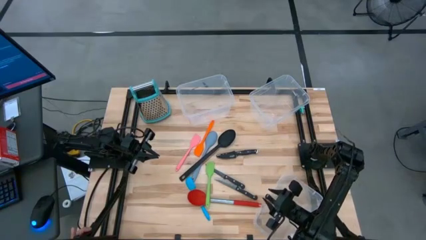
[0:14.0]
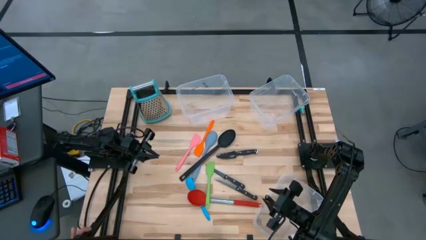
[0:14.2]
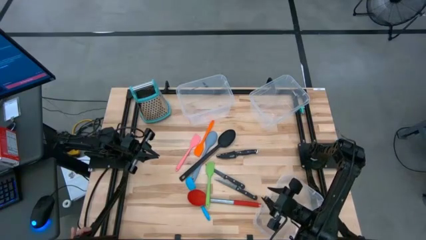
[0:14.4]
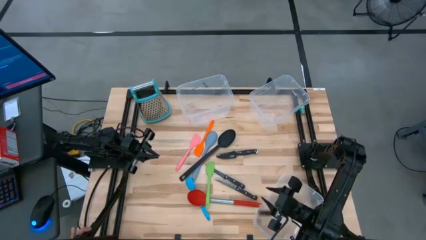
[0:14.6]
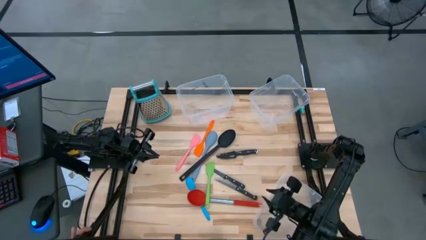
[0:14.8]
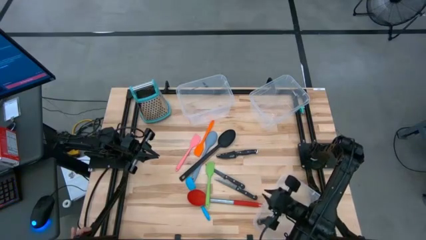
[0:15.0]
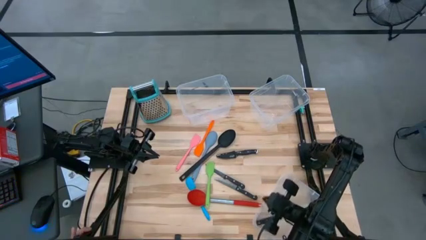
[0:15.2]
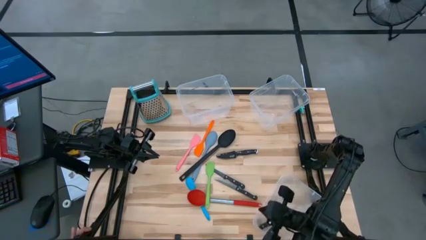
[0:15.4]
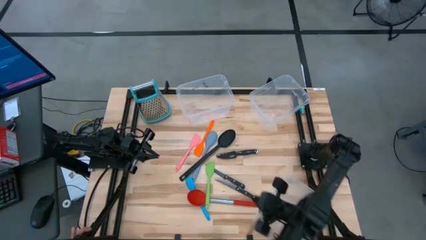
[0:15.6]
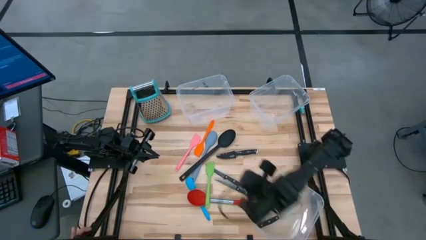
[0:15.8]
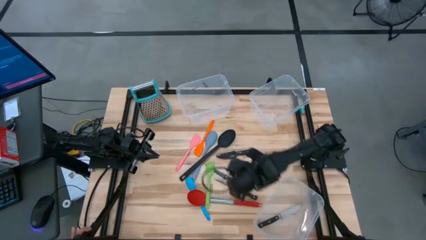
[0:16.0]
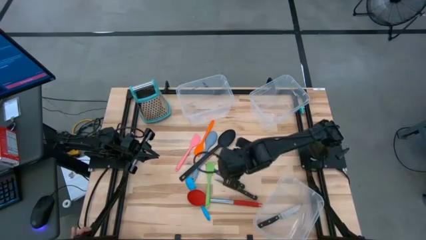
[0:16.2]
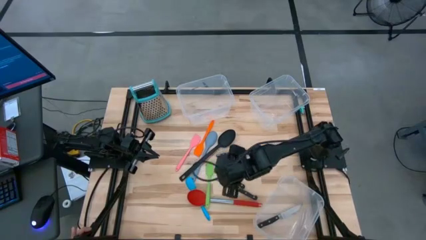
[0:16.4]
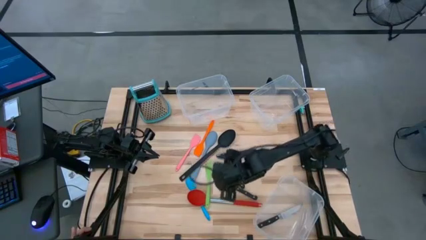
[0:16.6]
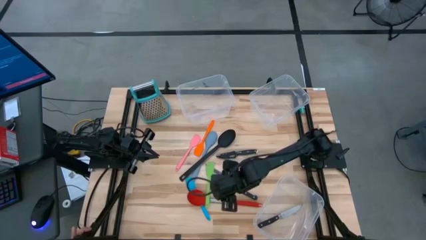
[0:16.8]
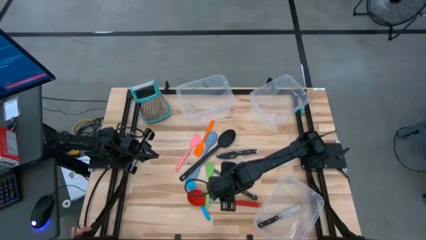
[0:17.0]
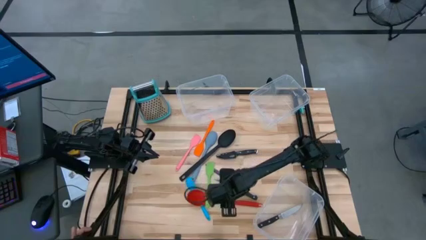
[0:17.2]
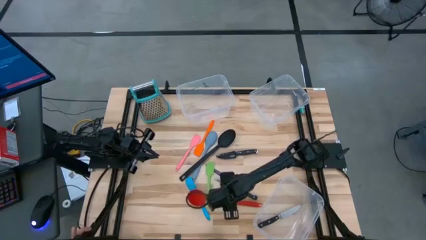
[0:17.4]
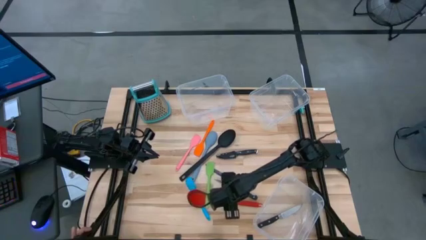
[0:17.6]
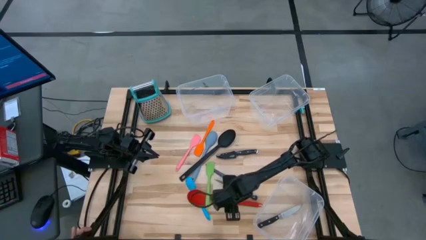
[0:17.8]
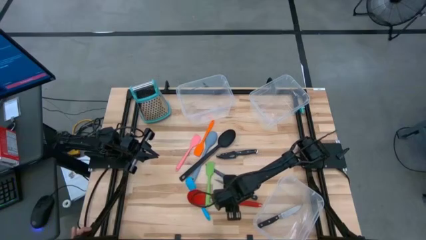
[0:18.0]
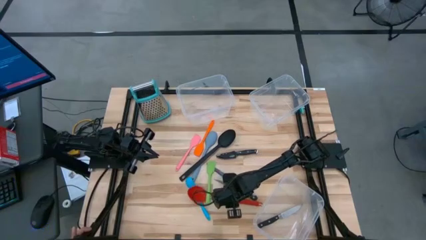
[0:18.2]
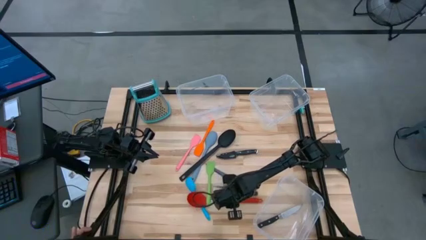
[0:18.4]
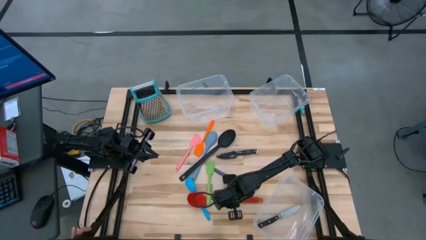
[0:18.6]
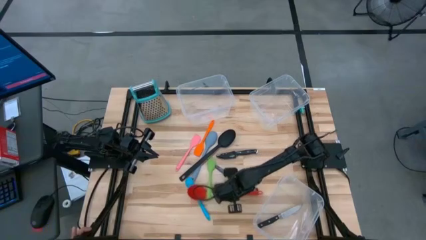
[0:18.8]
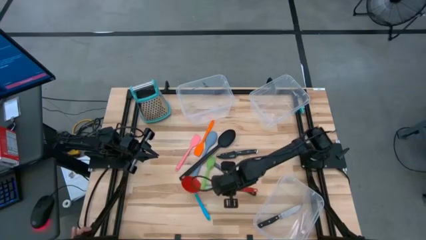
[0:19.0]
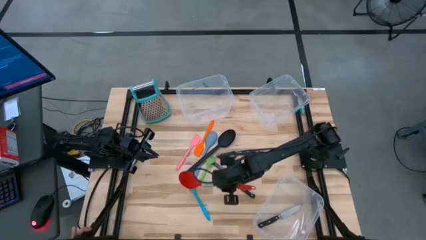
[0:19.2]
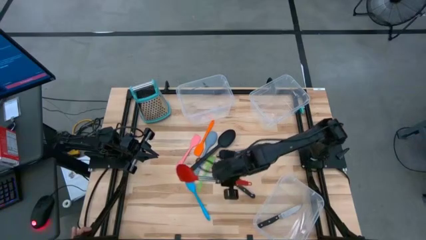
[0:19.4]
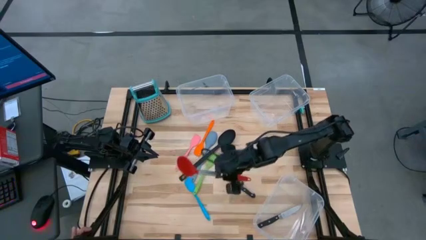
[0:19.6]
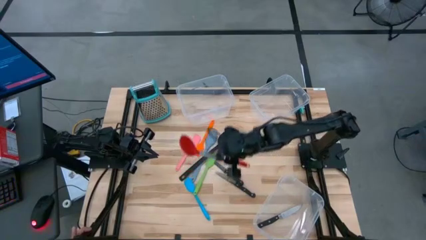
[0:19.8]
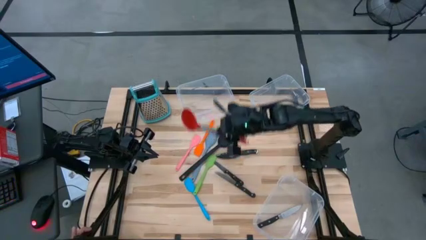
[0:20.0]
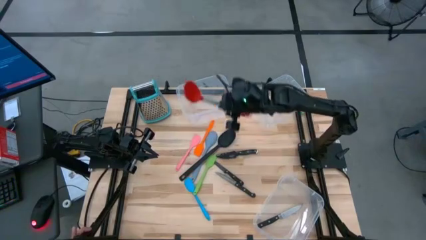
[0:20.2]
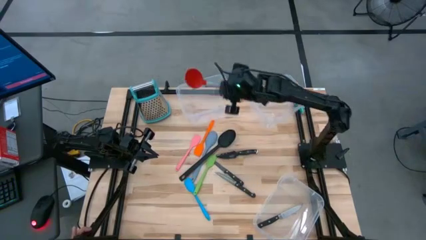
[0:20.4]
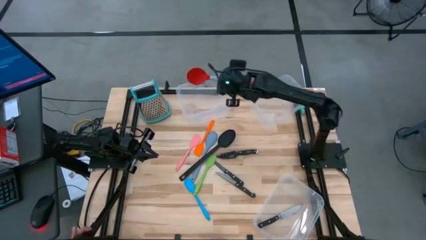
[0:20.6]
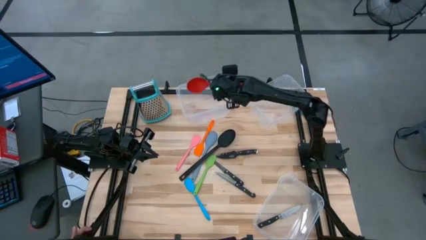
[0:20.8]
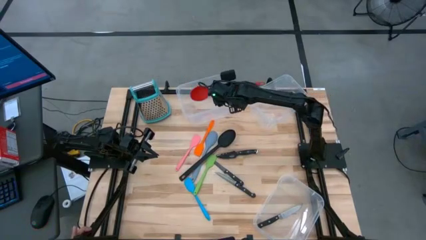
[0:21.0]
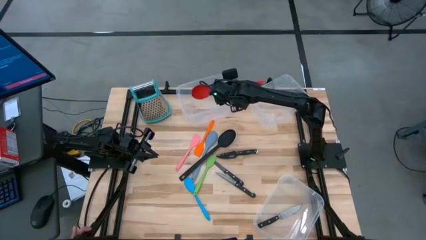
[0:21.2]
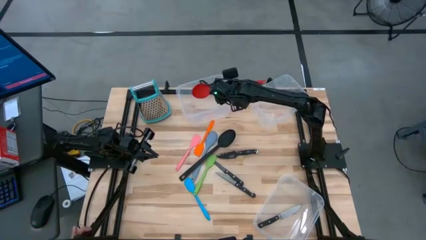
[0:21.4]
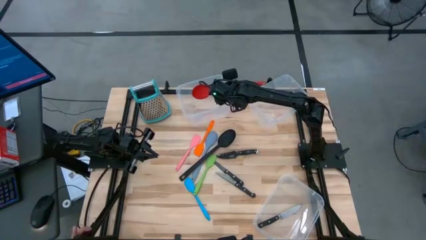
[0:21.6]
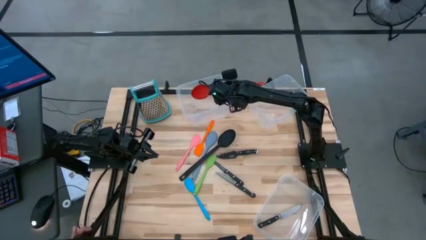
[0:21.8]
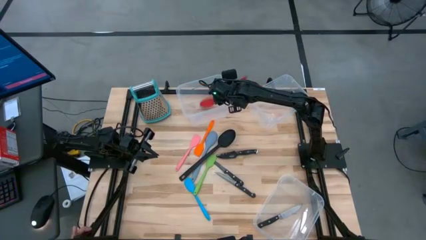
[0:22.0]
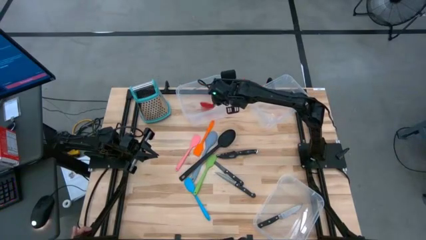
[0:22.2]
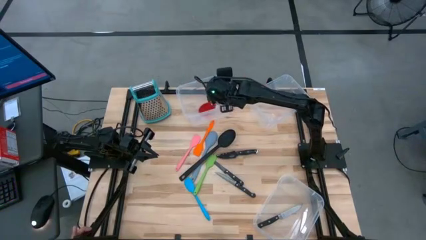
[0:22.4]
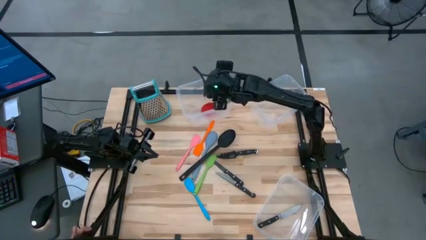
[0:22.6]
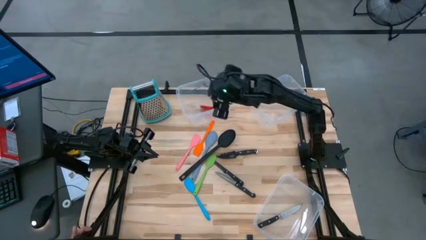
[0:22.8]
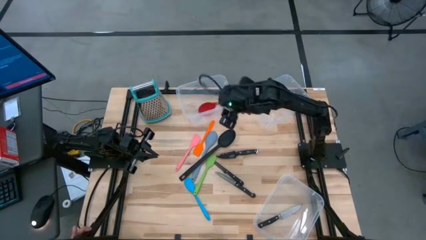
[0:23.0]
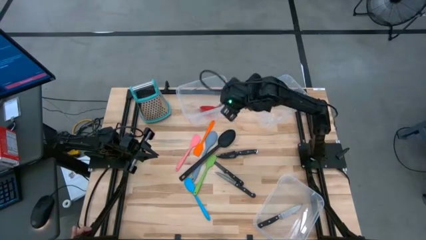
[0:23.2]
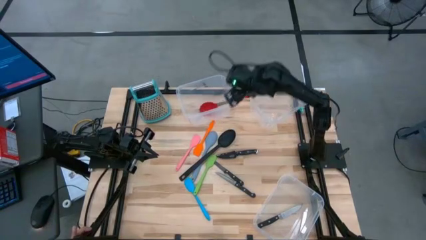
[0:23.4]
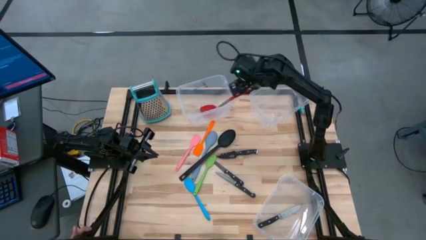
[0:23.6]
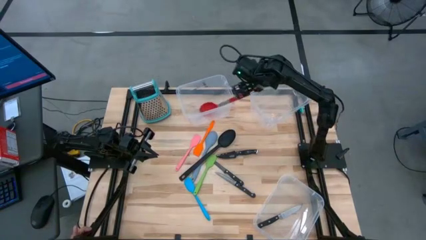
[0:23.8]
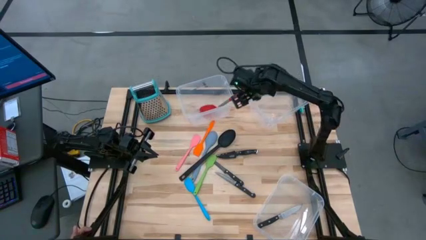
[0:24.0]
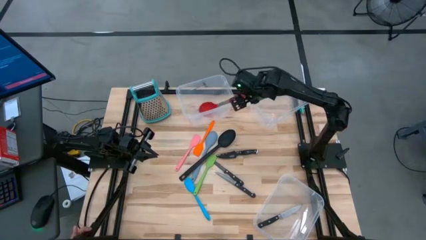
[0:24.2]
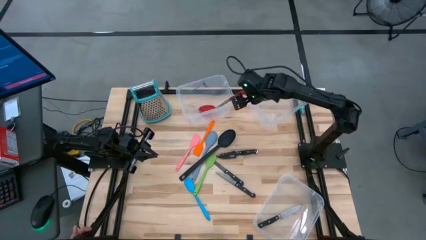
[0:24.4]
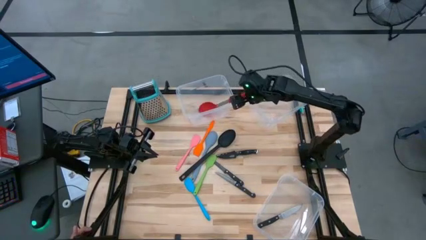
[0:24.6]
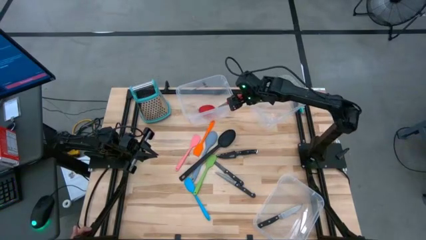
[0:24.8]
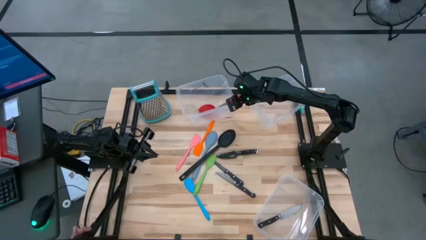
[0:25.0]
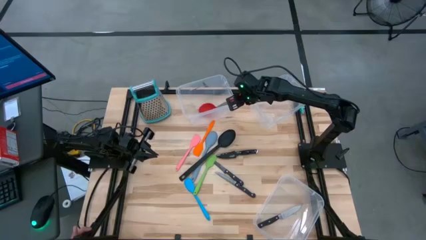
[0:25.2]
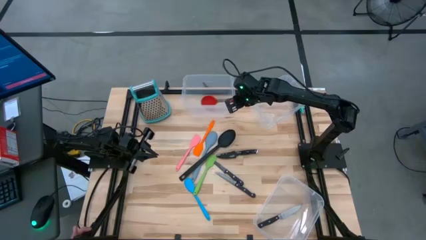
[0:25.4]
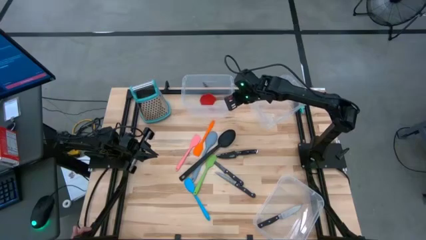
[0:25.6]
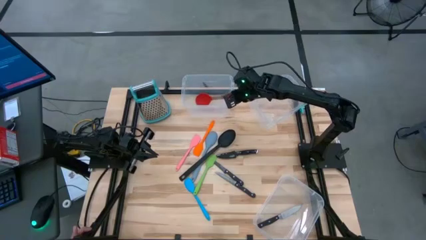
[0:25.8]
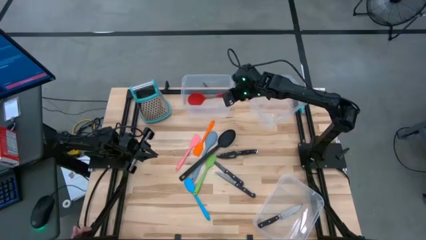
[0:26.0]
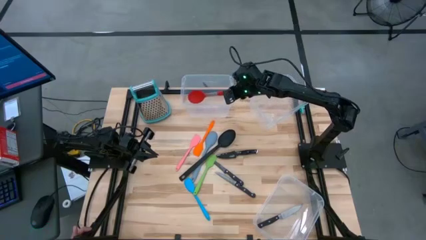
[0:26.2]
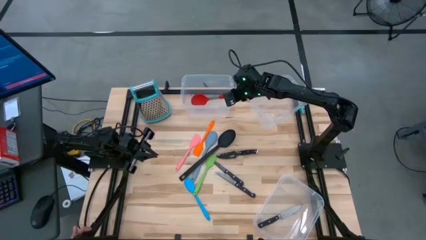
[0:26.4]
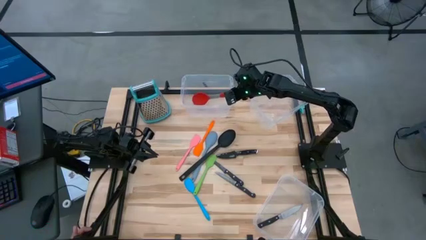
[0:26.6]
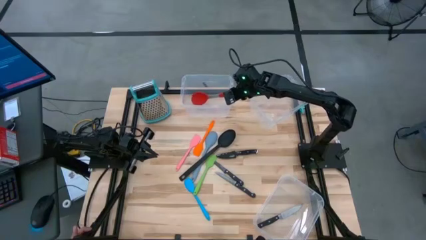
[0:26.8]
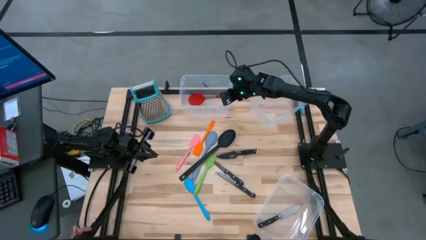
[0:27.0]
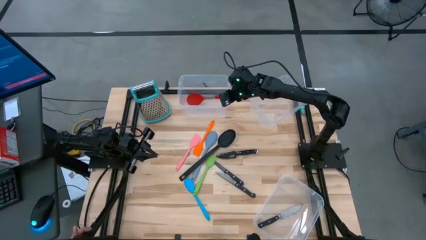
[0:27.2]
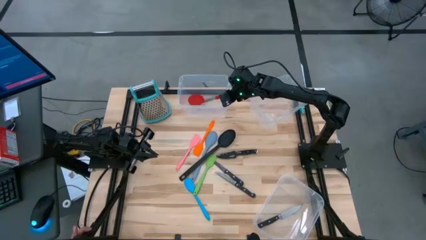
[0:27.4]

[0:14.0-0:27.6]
Task: Pick & Place Kitchen Items
Put the bottom red serving spoon into the top left transparent bin
